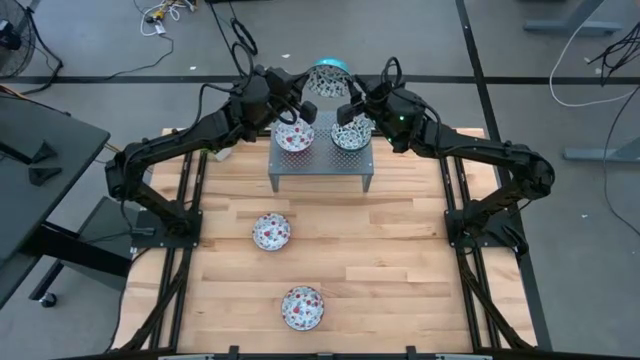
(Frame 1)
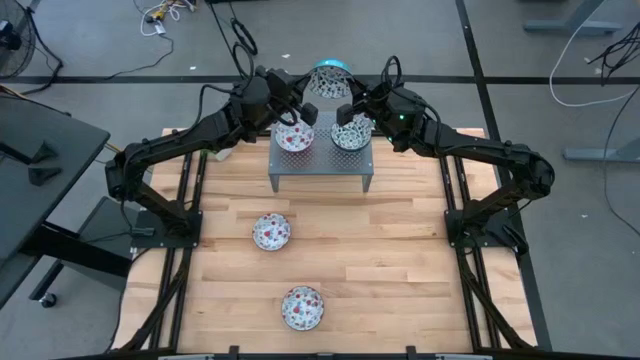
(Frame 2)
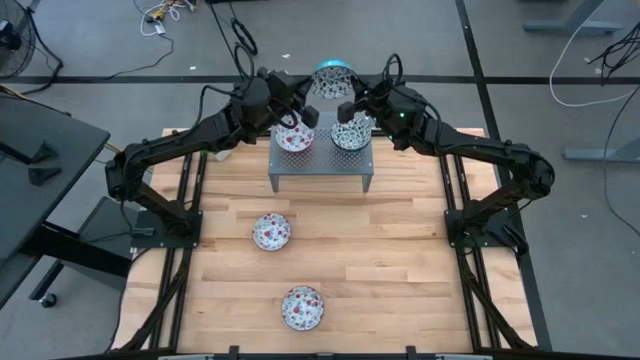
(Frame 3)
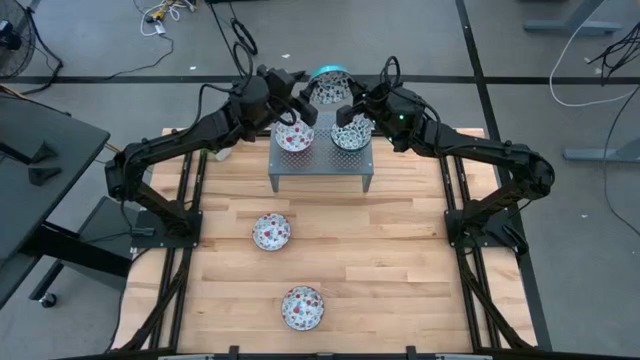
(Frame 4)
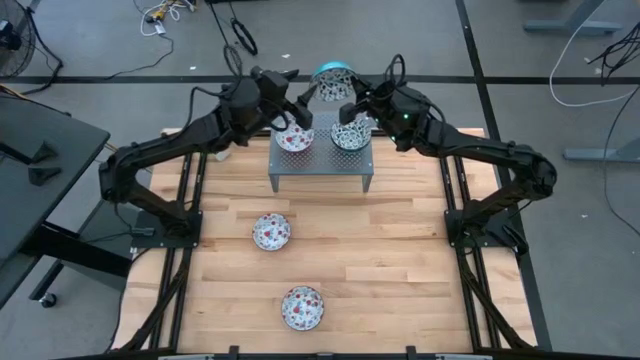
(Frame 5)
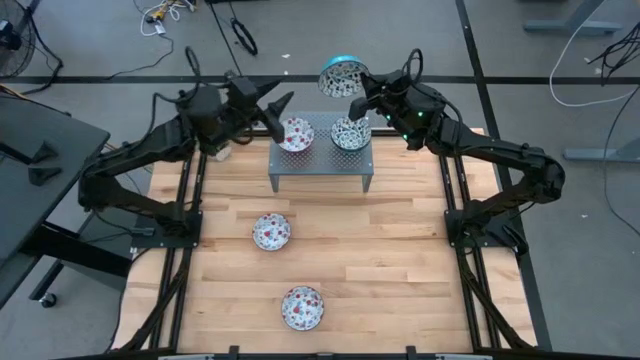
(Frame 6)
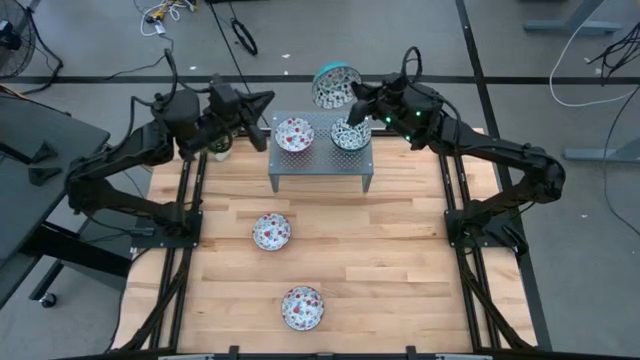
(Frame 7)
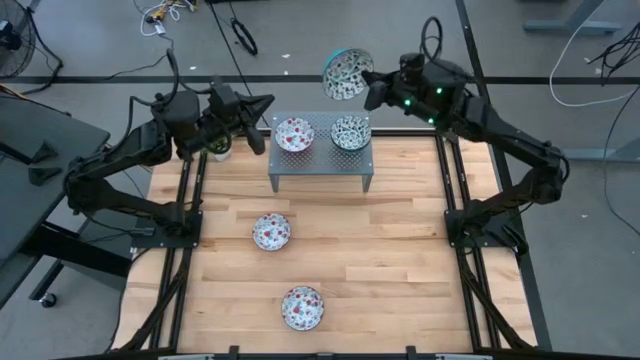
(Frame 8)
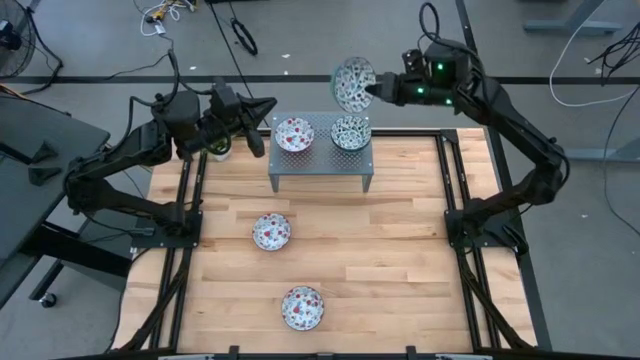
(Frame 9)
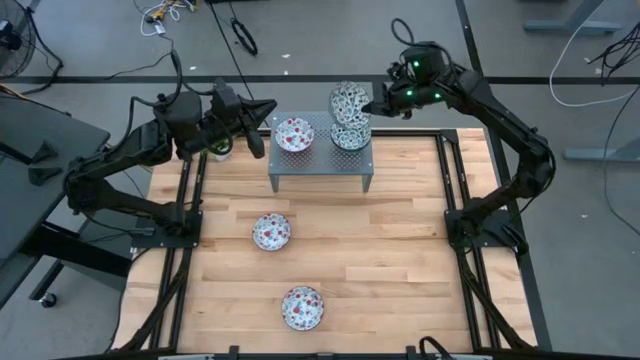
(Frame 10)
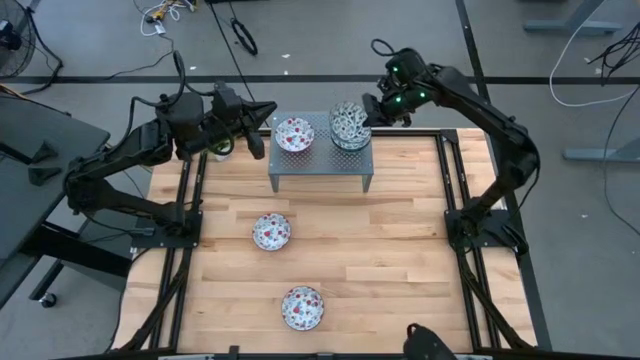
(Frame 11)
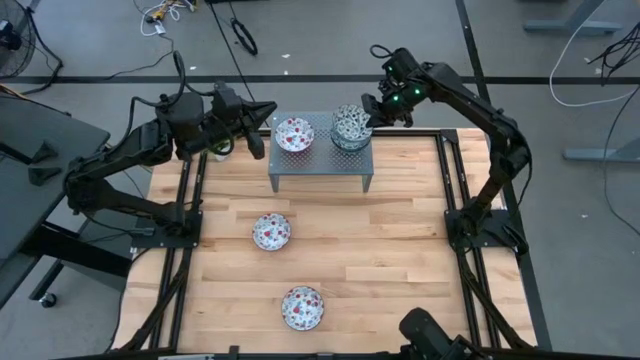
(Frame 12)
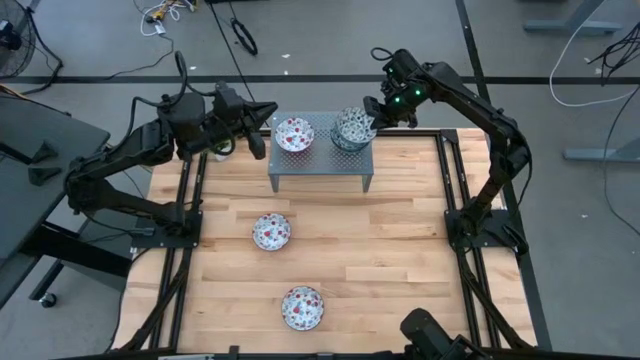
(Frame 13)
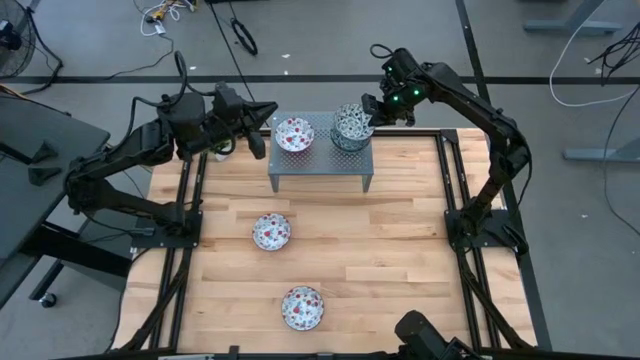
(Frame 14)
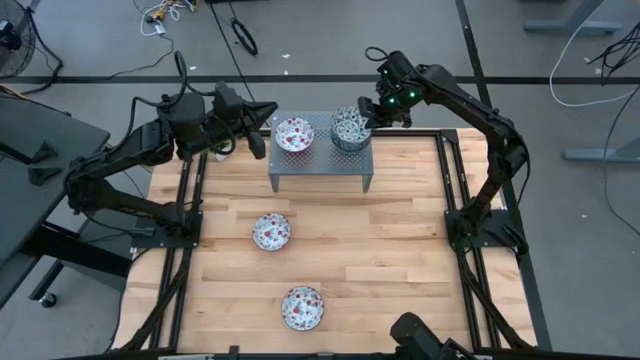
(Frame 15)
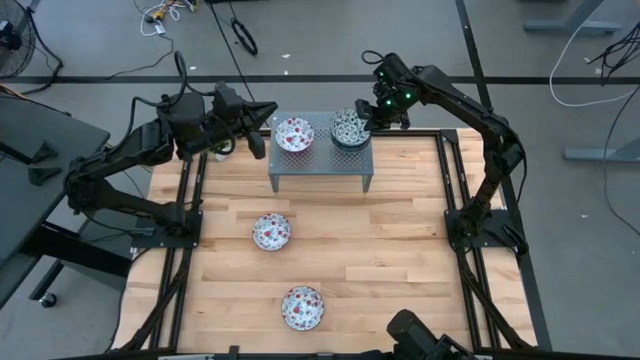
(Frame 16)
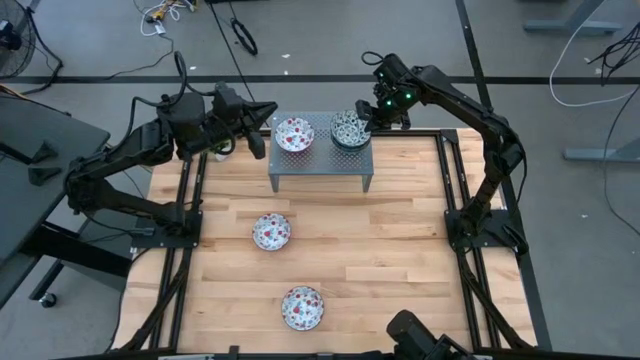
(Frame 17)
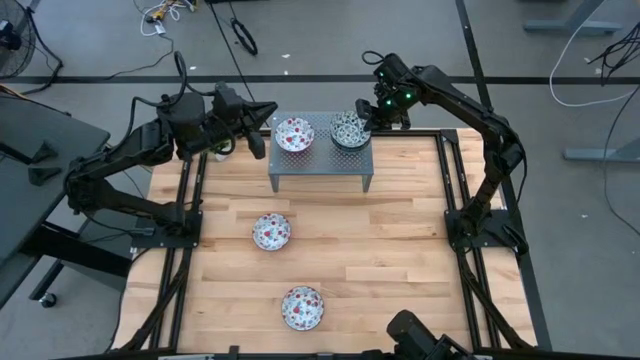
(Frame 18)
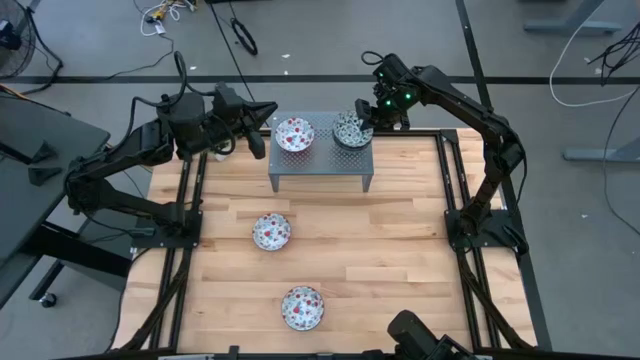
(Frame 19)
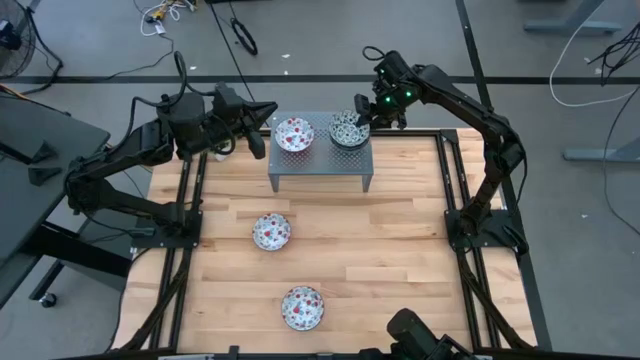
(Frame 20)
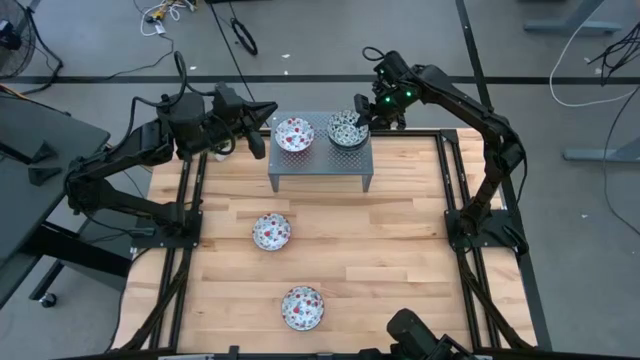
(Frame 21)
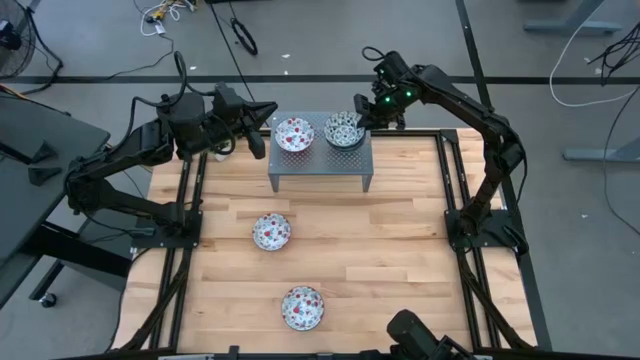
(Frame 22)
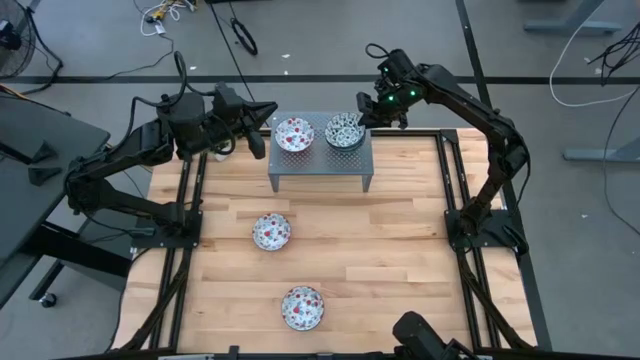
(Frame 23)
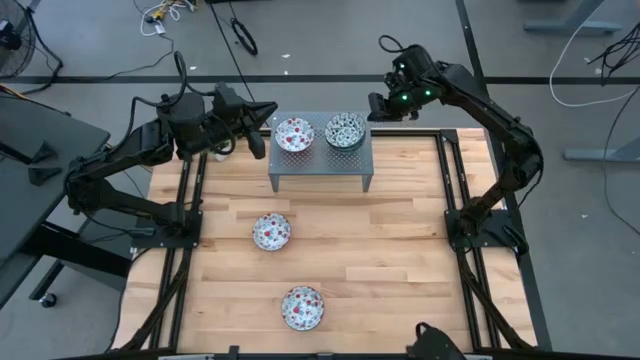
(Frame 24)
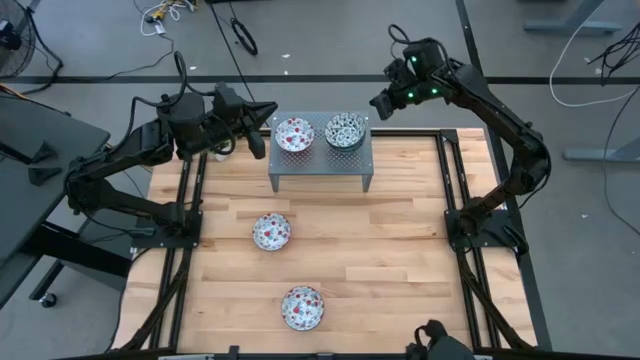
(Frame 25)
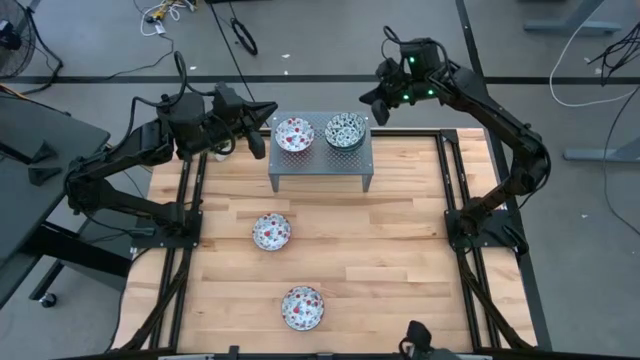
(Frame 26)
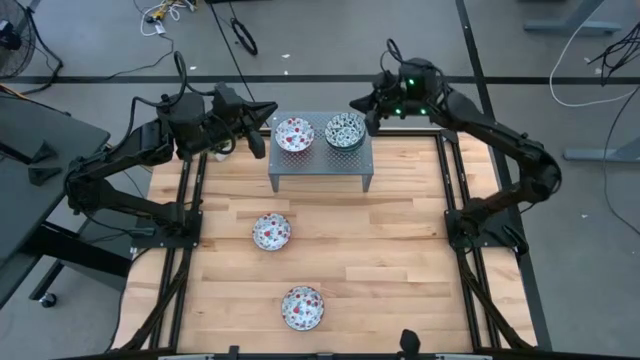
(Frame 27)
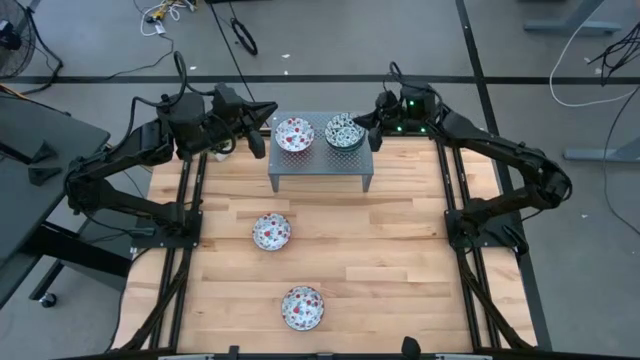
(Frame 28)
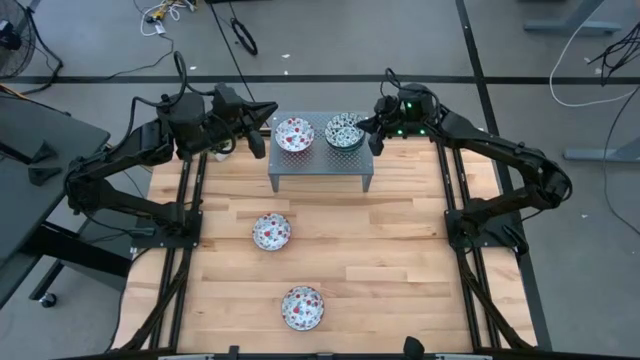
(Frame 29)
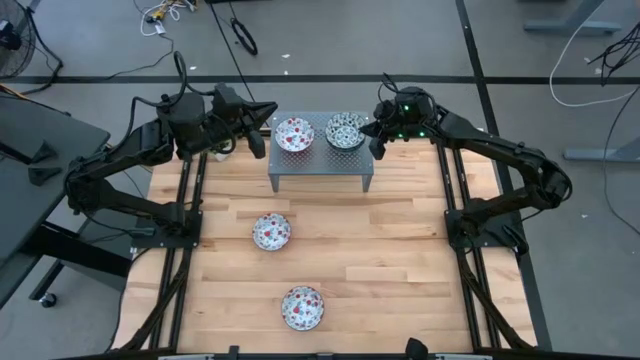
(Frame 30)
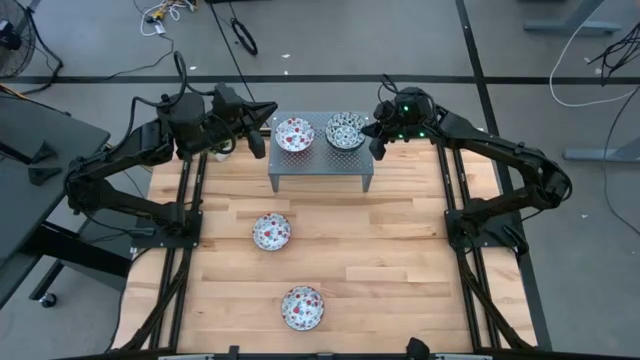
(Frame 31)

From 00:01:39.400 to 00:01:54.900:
Task: Pick & Place Mini bowls
Stack the top blue and white patterned bowl on top of the other blue and white patterned bowls on the shelf

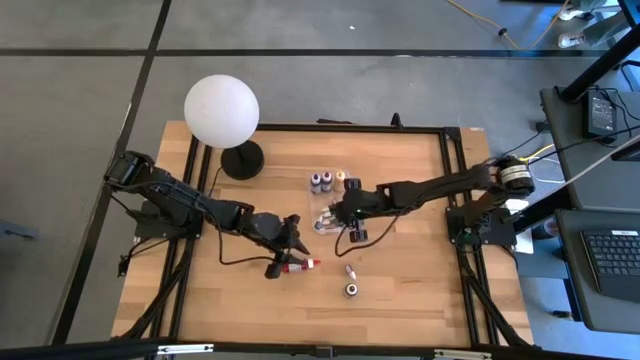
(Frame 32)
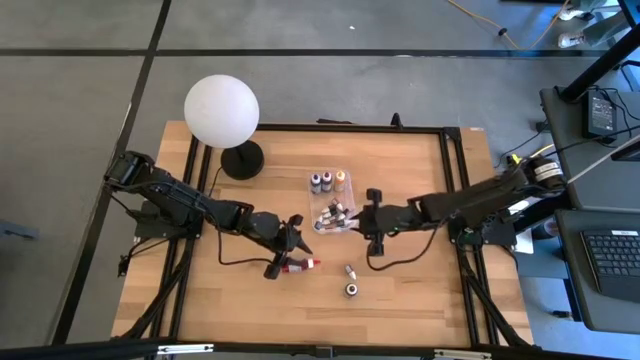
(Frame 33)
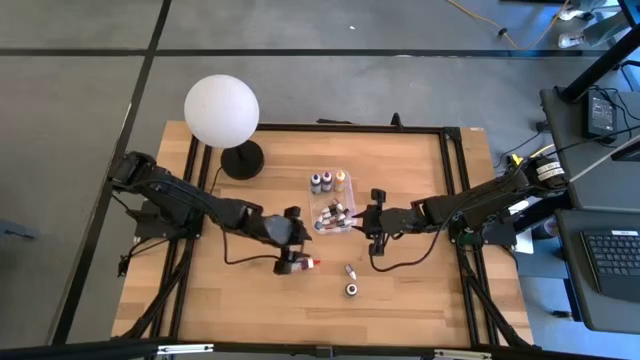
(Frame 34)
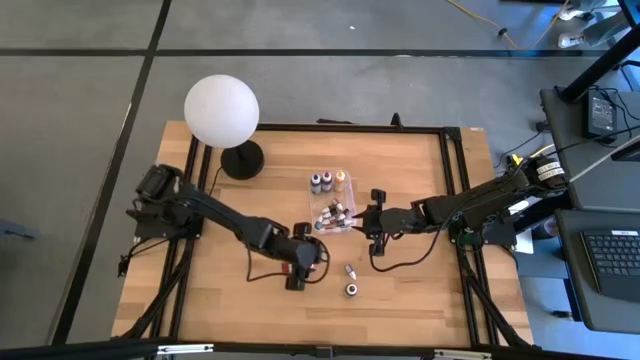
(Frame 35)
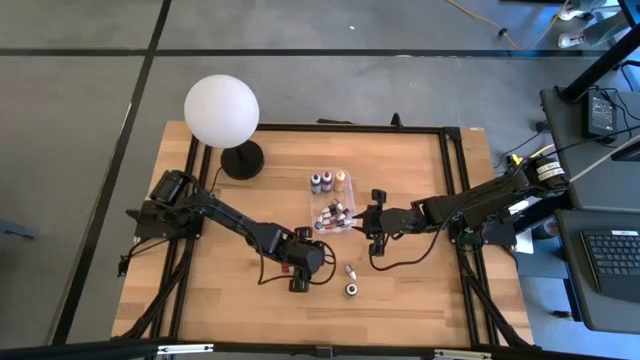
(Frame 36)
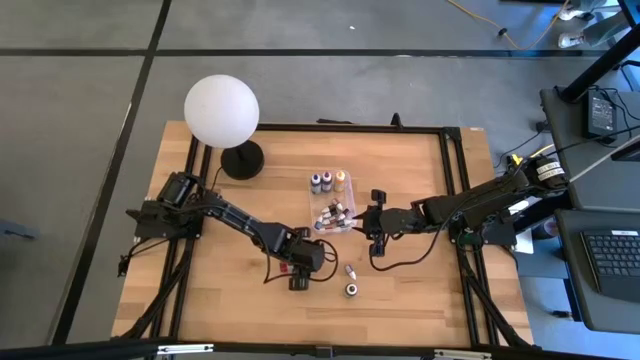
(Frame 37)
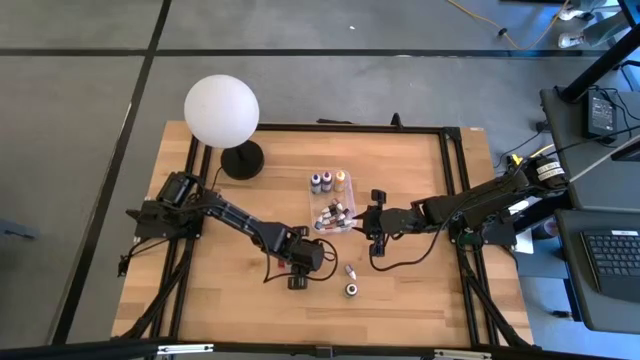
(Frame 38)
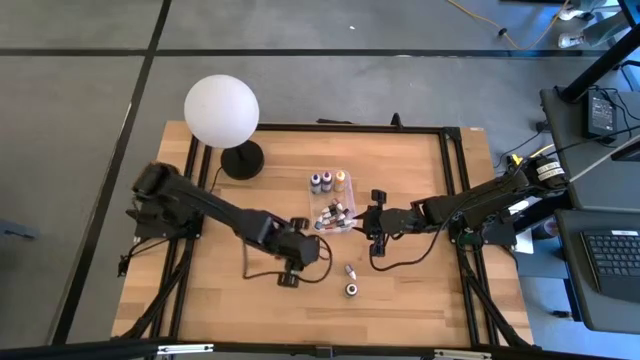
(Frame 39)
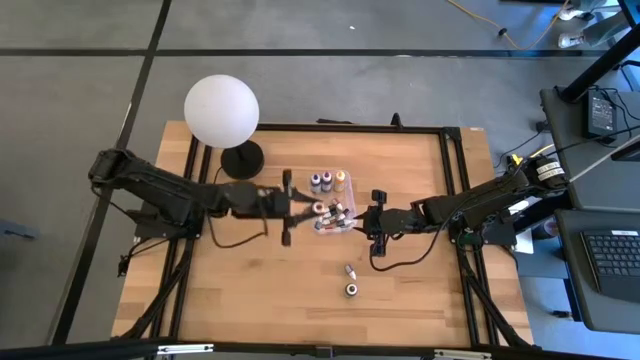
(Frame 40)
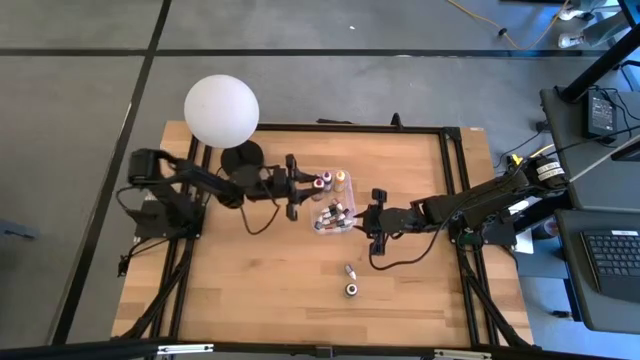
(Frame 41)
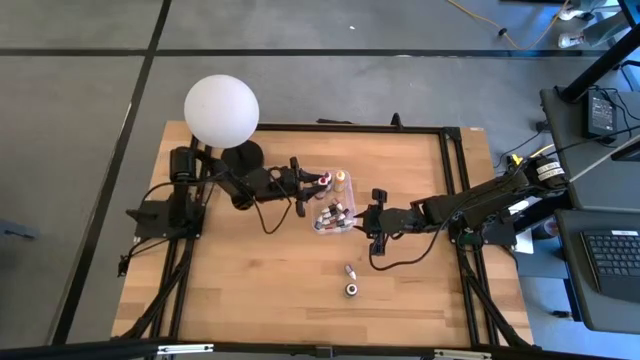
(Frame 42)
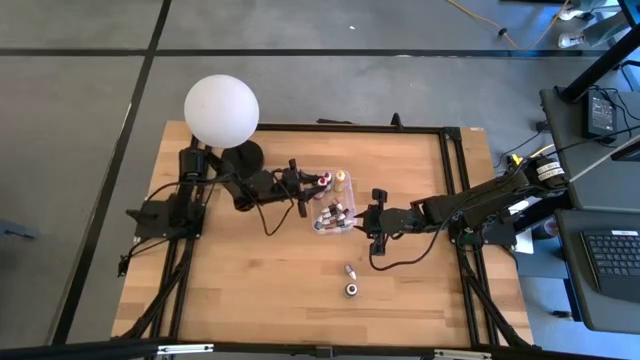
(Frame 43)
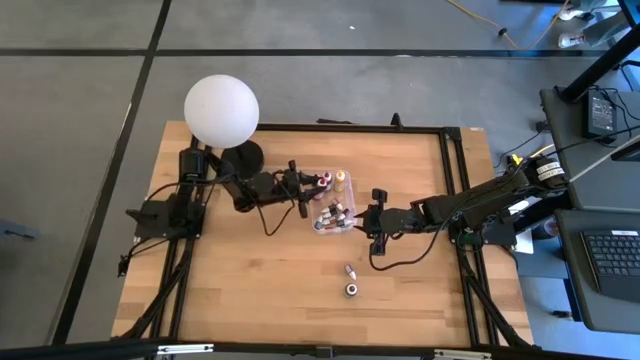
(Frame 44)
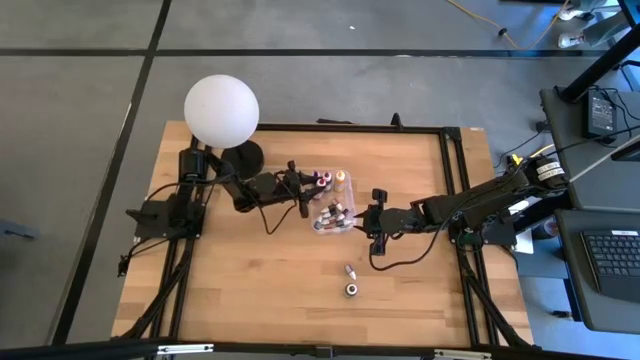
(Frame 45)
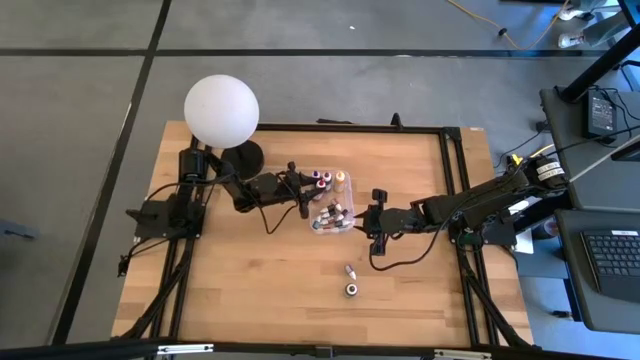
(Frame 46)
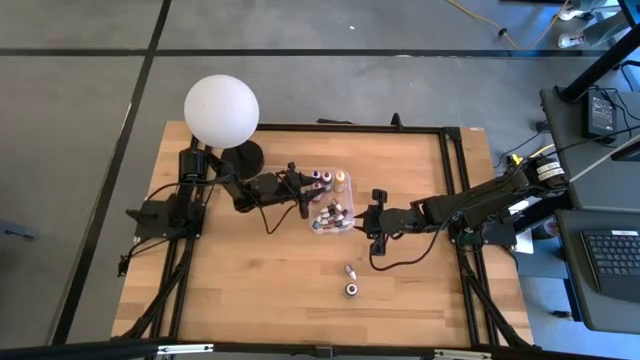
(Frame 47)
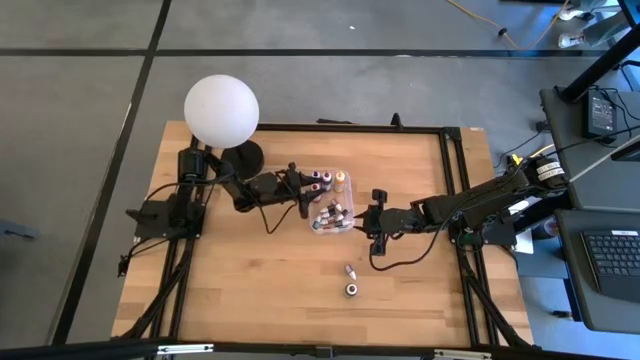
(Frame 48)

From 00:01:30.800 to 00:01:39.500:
Task: Pick & Place food coloring
Put the large red food coloring bottle in the transparent bin
